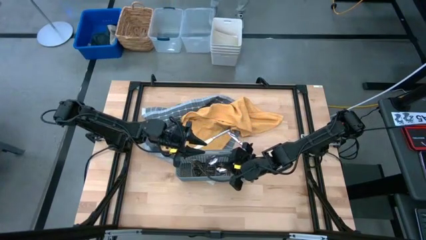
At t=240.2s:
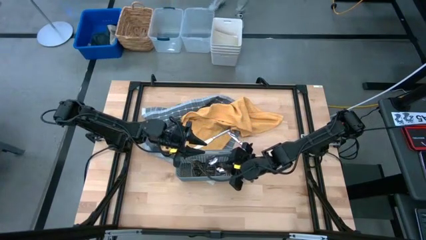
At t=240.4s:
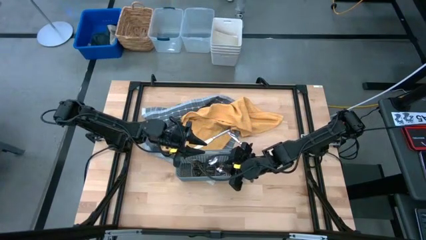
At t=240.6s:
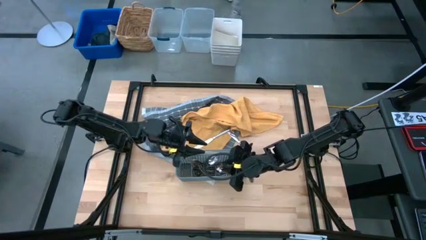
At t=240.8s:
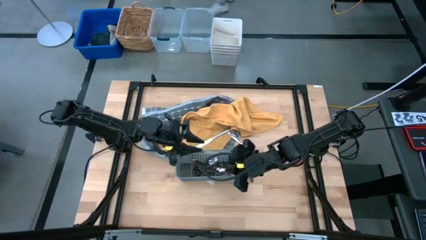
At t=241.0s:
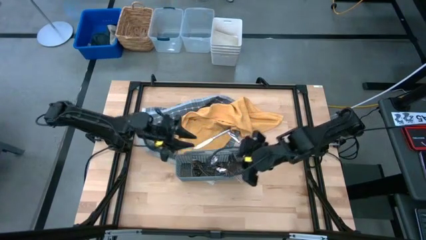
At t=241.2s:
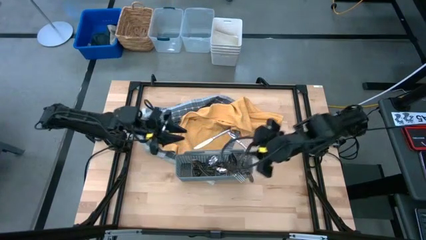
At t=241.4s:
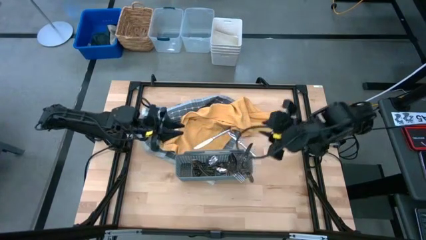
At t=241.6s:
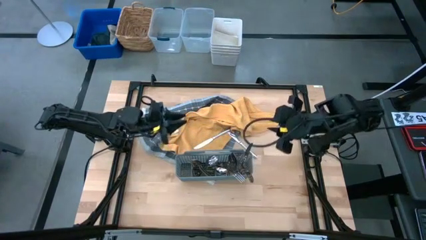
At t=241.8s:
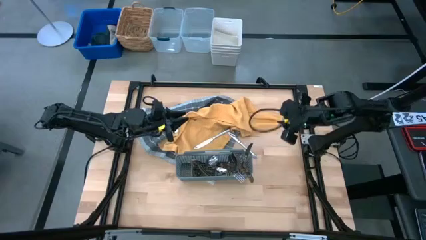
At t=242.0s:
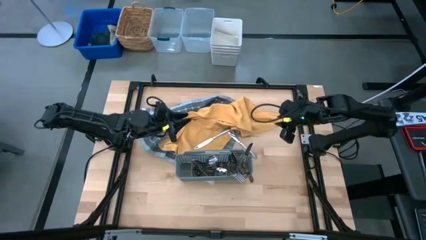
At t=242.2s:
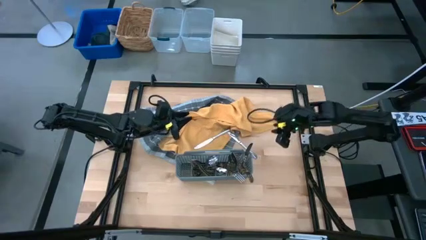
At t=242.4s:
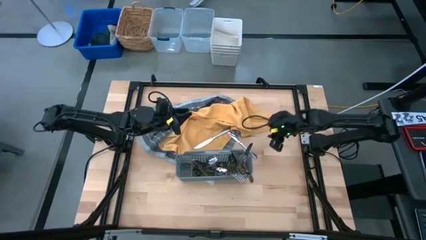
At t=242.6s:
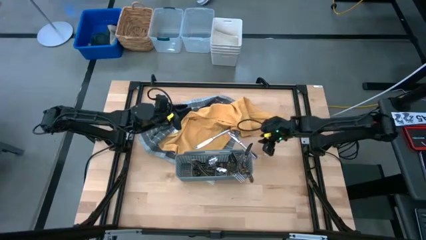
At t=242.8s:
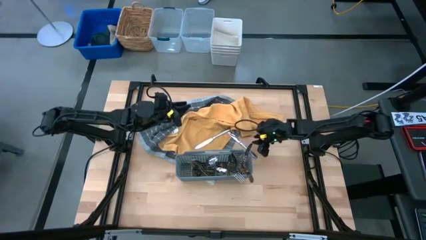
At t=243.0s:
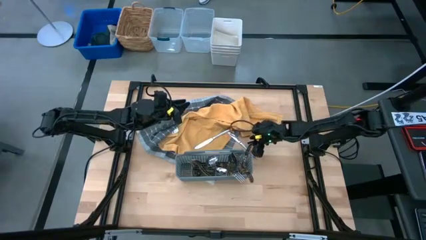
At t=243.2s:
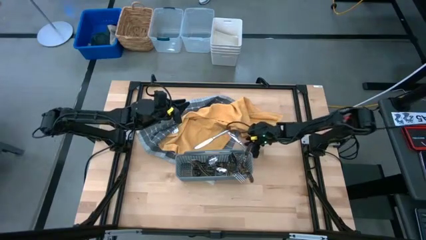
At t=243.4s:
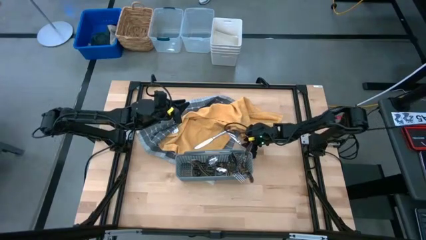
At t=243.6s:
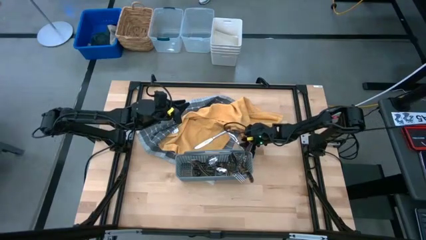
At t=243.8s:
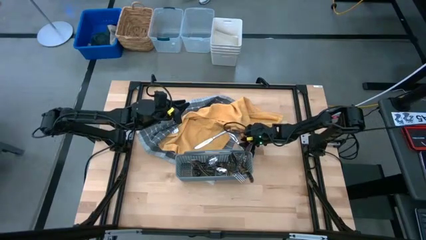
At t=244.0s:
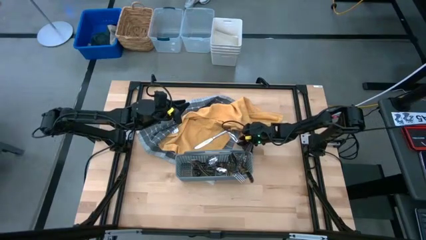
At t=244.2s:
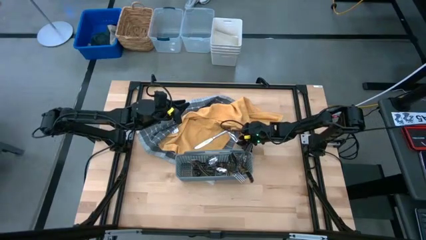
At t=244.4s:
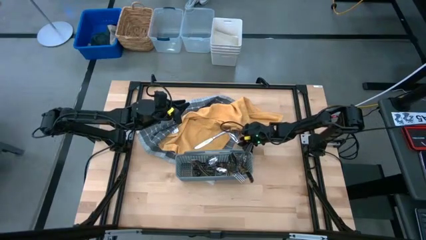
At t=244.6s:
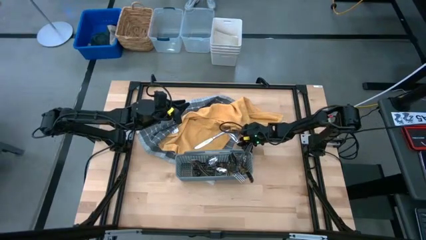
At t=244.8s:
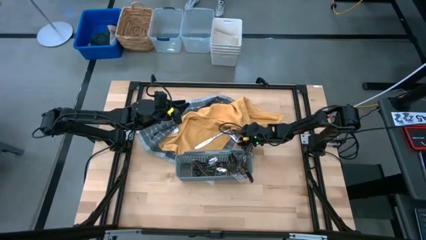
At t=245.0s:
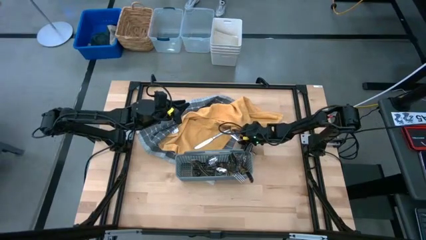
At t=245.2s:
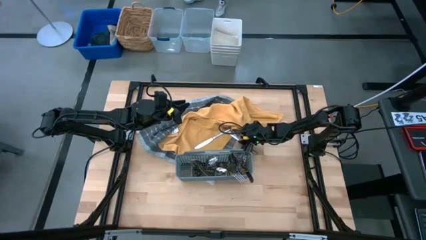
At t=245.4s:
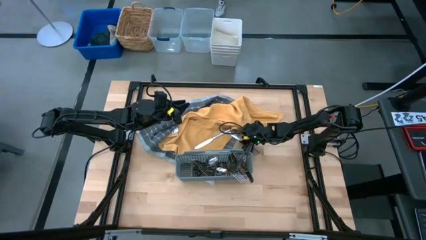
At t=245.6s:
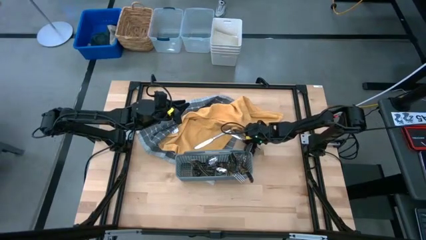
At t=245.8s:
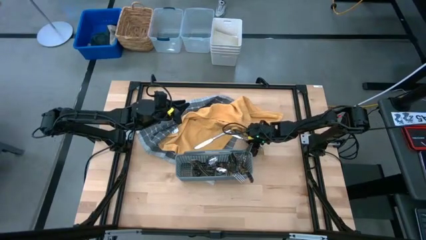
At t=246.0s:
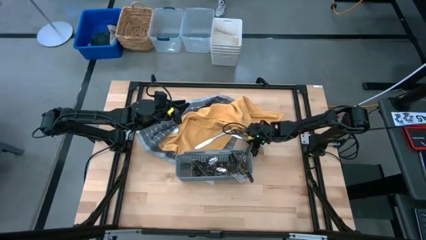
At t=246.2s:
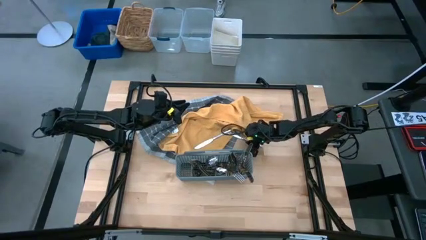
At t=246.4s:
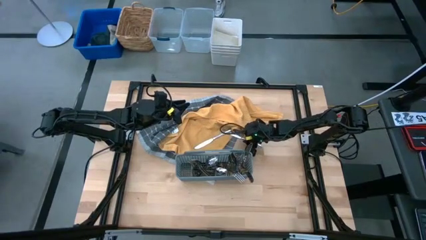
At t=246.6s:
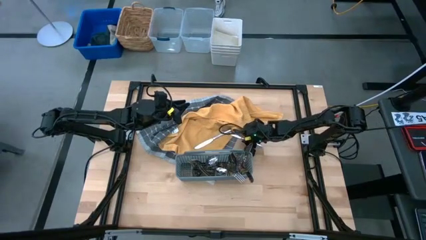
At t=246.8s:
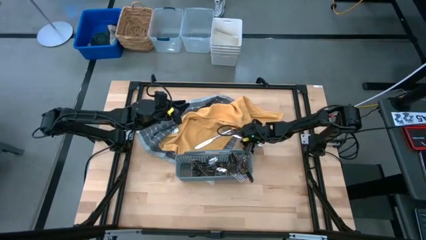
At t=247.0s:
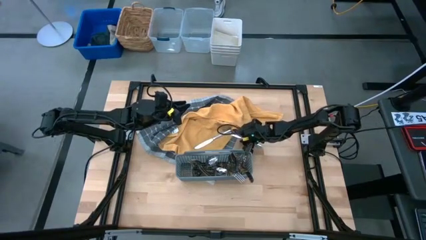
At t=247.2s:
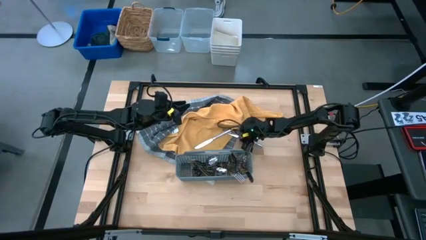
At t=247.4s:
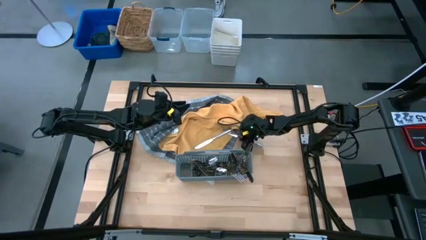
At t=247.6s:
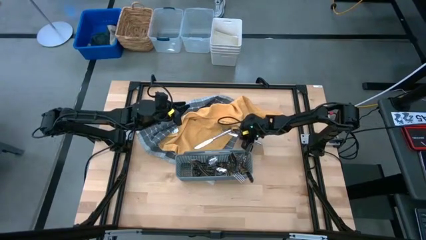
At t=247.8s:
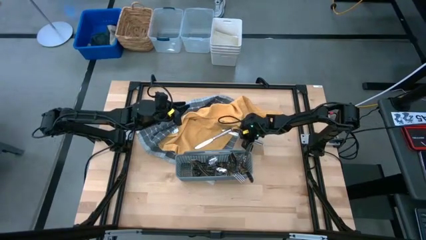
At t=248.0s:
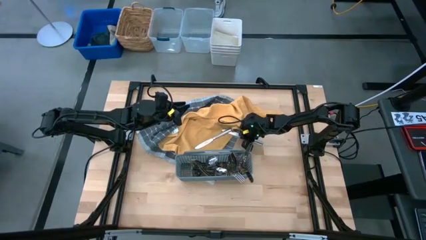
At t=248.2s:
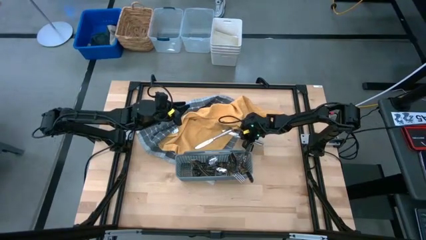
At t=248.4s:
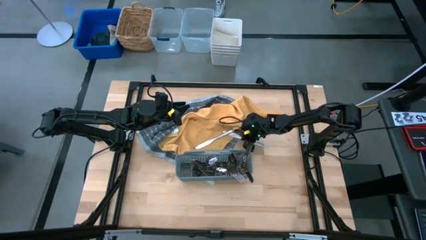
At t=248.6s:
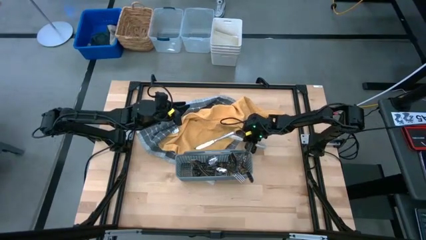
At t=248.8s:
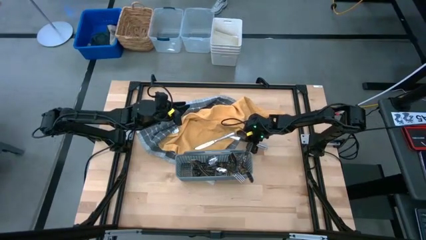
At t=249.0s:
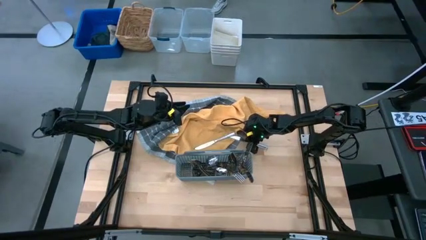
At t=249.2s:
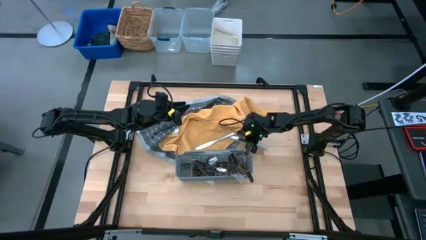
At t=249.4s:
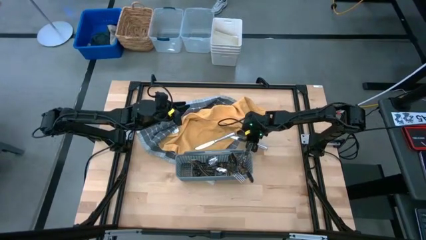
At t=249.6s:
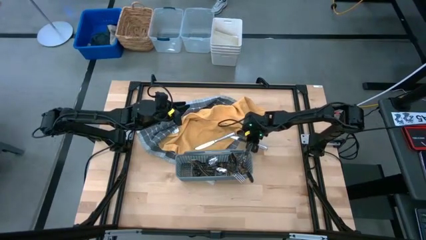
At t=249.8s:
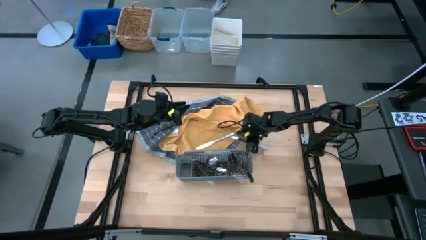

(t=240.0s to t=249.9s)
Task: Sort silverware
Put the silver knife into the gray silverware basket

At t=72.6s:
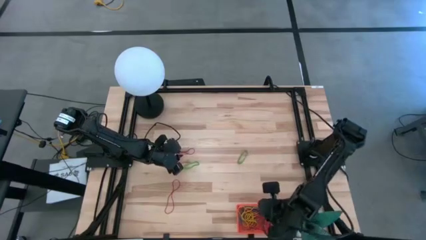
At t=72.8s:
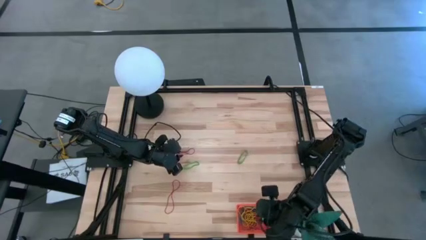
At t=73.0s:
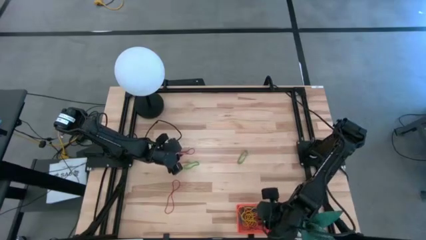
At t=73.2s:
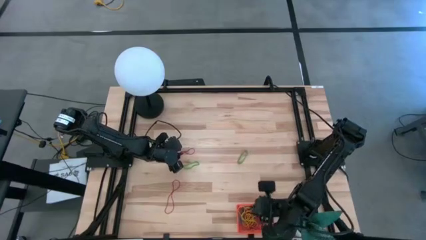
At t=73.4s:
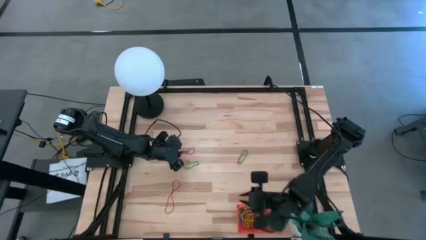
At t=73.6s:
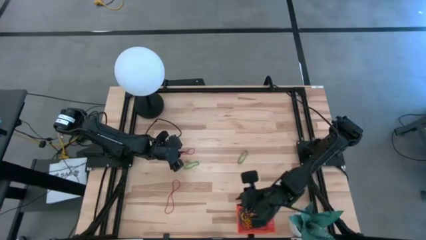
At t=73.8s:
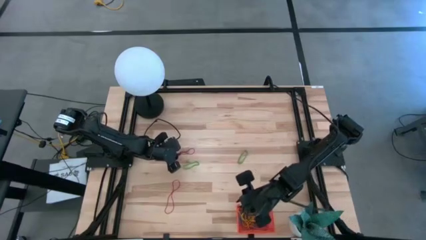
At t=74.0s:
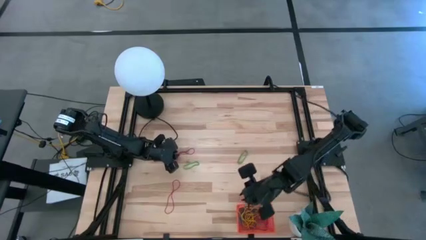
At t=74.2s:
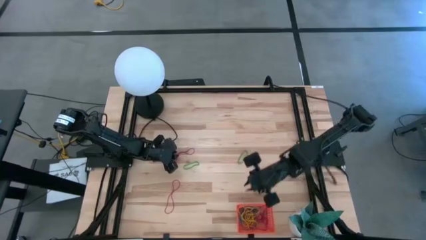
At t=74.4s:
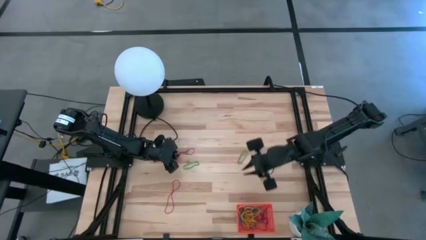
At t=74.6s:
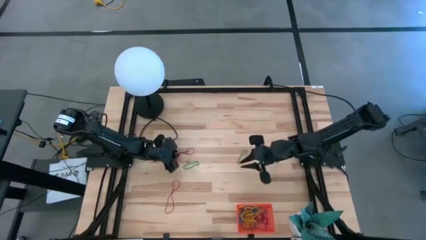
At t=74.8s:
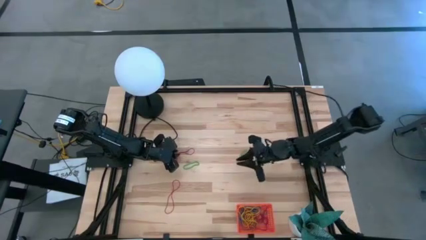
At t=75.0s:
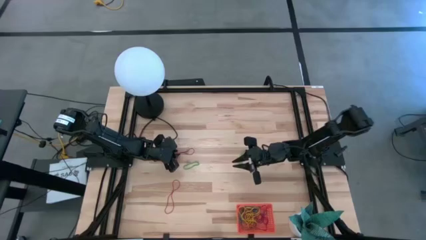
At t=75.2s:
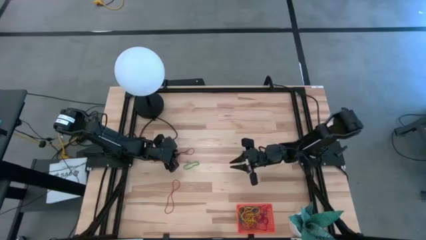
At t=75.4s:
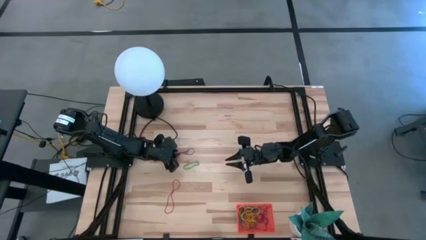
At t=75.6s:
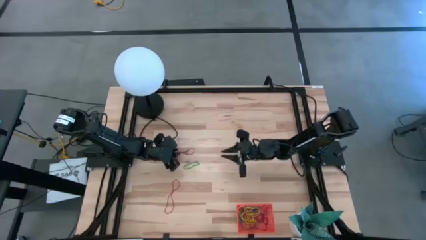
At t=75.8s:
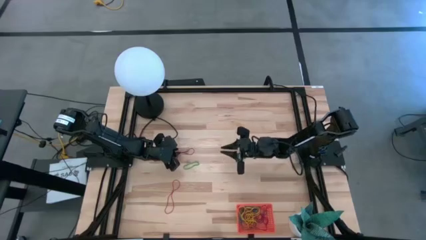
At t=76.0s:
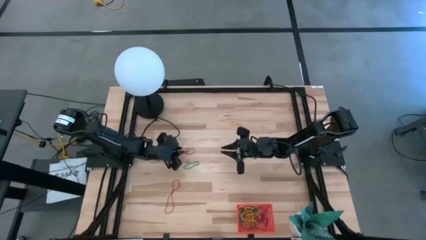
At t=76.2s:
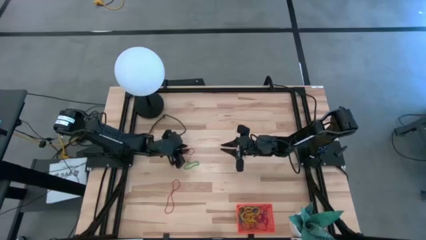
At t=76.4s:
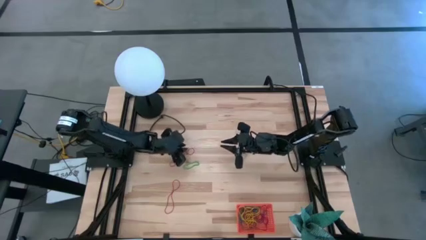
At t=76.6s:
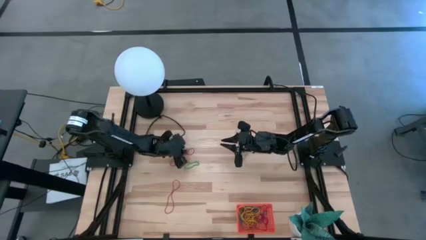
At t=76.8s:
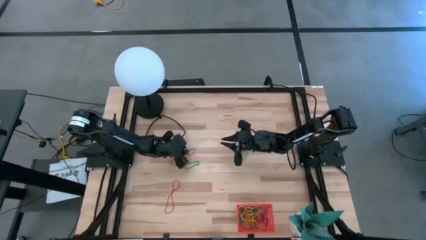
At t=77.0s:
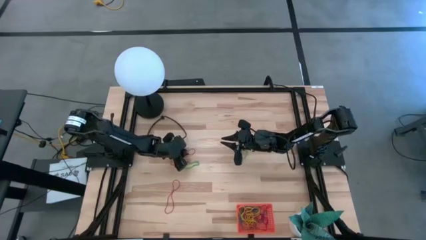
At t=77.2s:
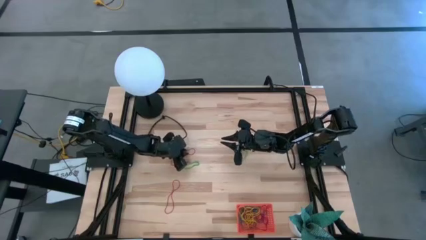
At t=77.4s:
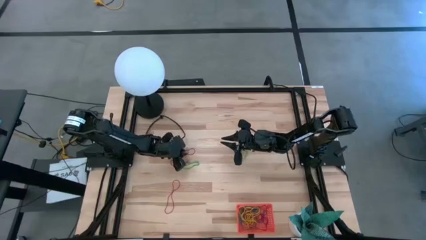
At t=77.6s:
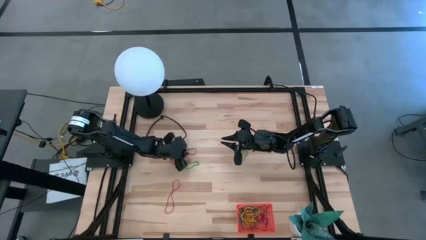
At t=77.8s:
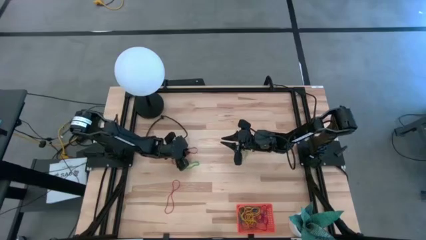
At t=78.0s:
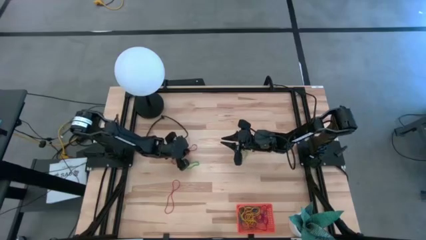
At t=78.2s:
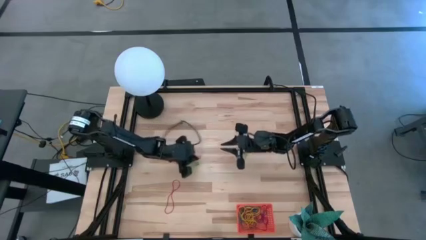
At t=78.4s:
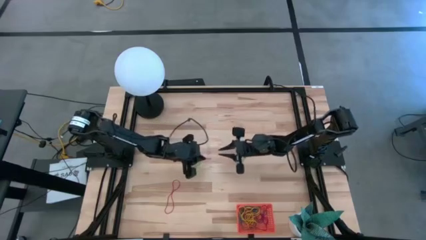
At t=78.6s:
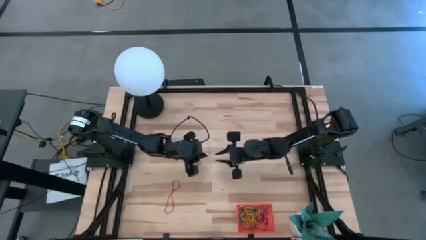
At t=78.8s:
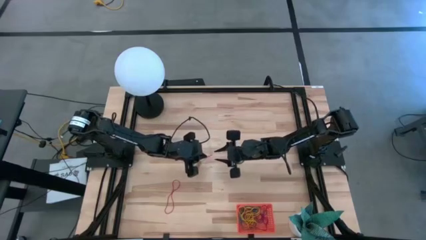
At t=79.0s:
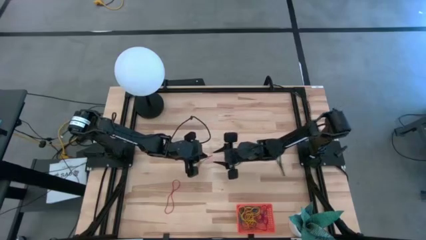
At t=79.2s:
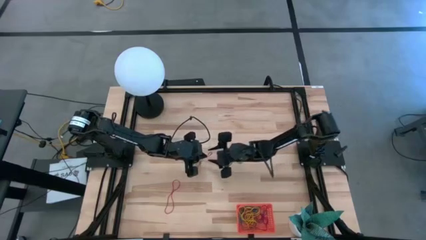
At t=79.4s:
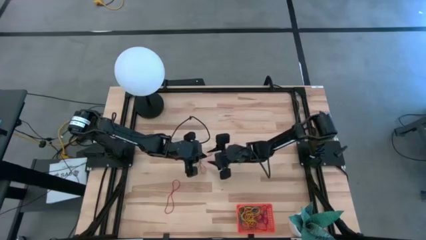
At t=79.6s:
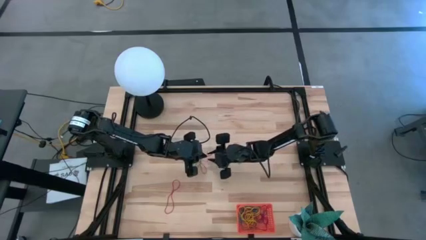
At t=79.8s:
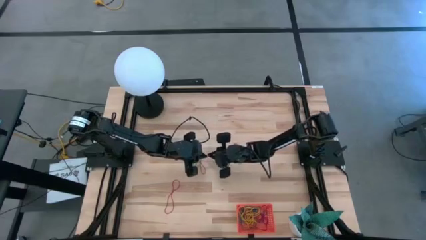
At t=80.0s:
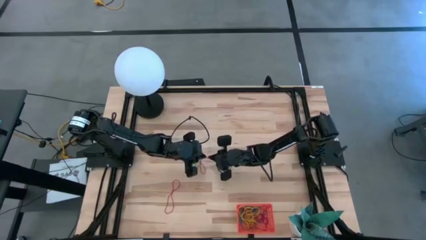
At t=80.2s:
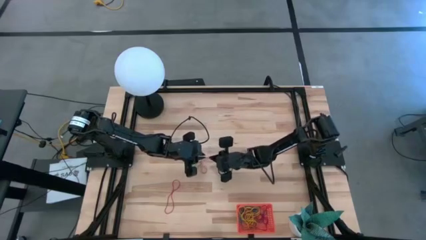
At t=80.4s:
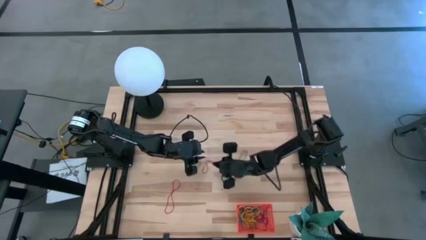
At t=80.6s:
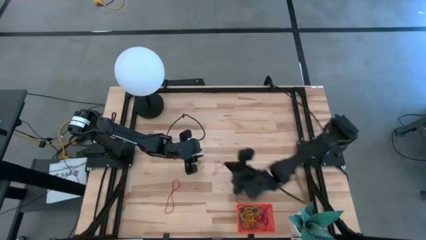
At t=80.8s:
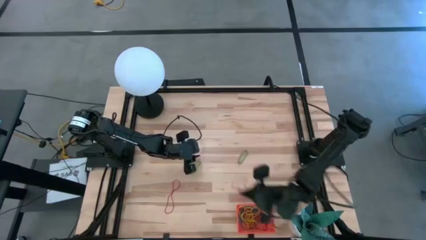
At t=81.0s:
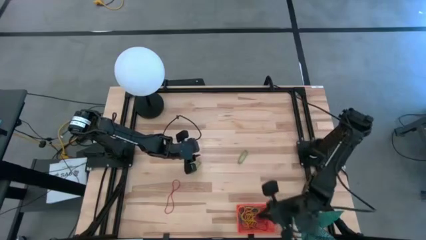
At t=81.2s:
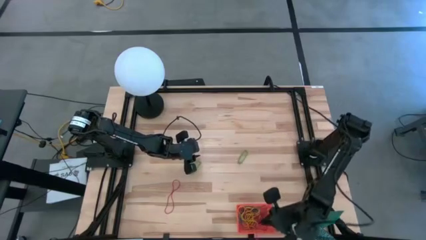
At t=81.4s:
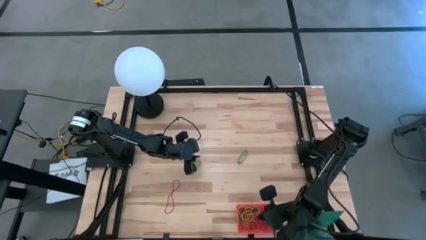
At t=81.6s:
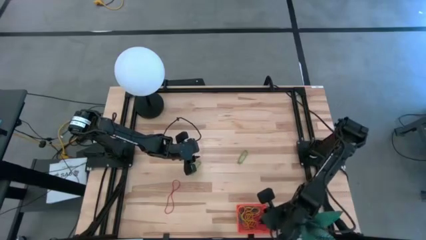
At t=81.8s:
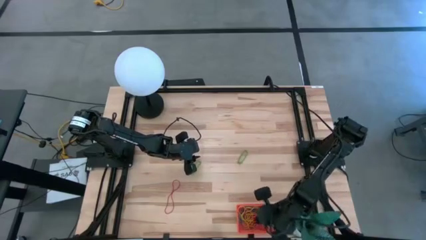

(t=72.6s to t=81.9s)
Task: Pick and place items into bin
Put the red rubber band into the orange bin
